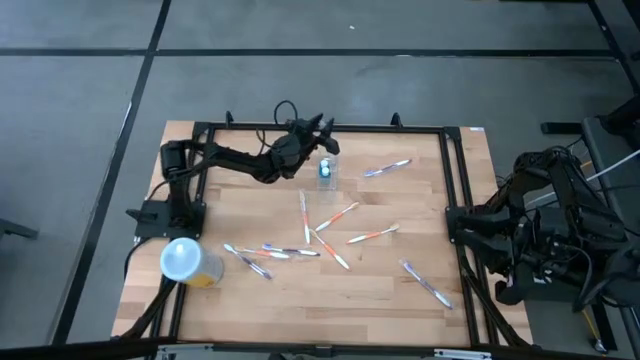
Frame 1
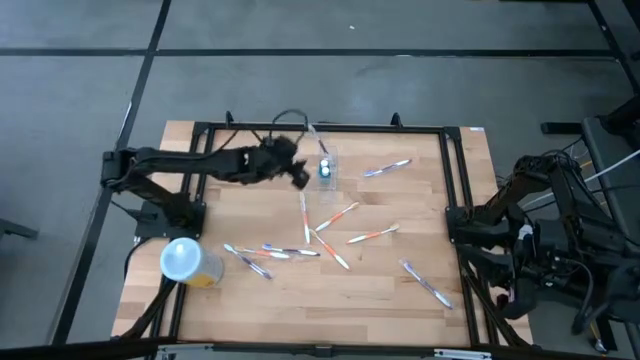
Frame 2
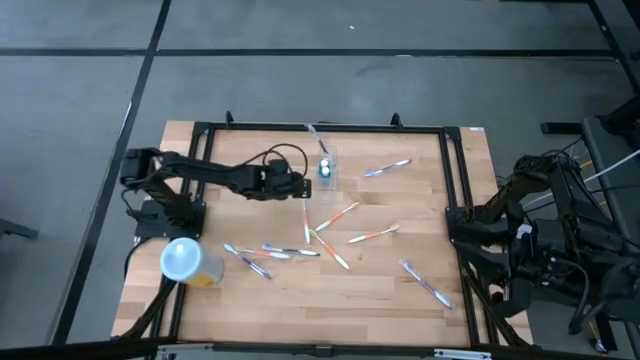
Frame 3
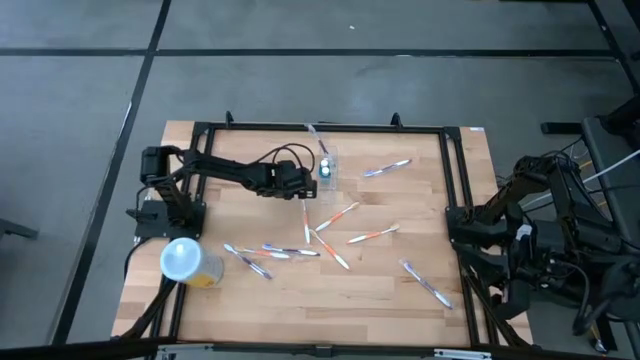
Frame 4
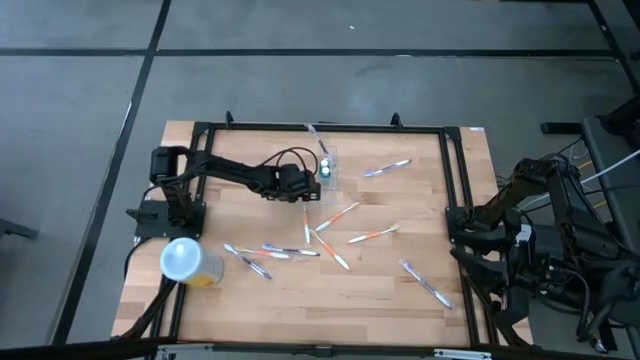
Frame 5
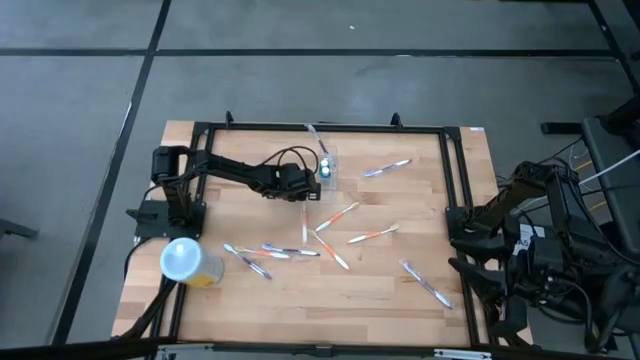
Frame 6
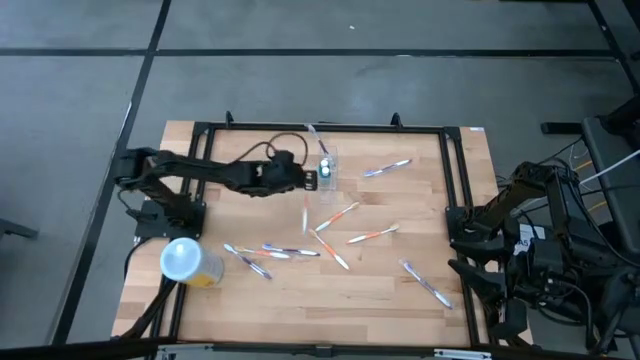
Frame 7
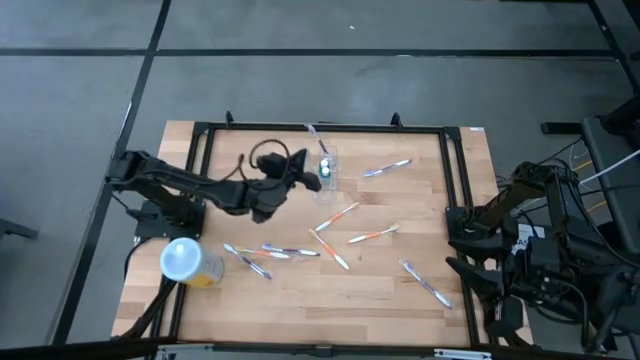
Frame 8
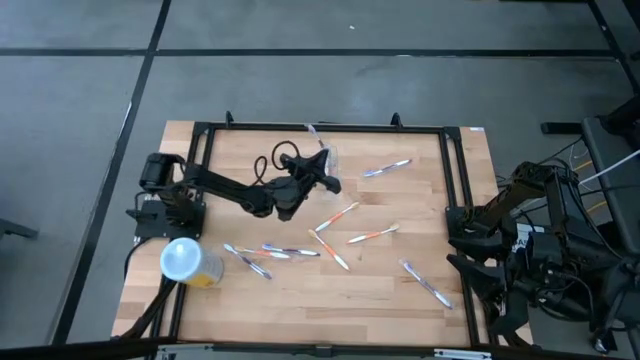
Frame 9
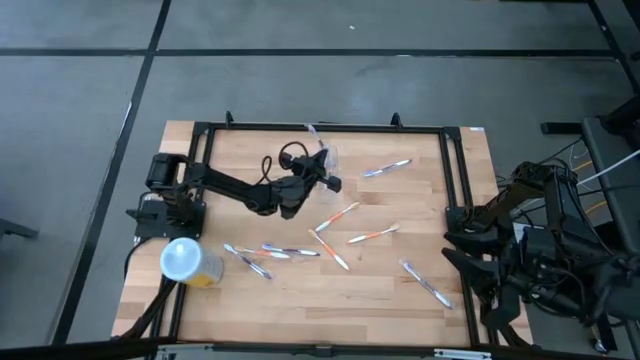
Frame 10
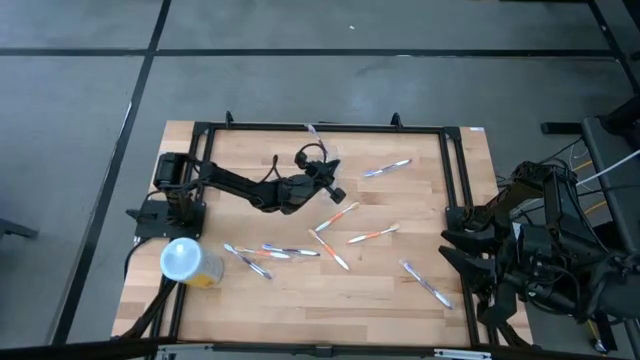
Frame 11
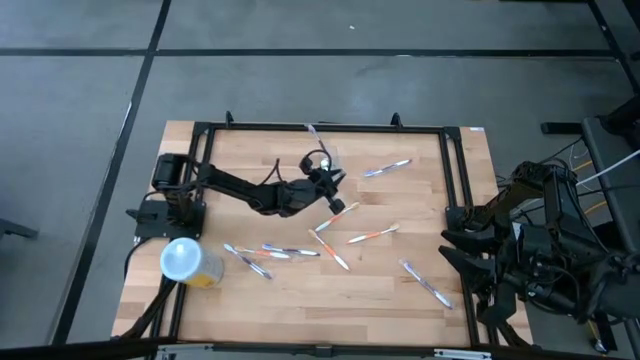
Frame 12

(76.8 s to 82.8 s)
Task: Pick & Place toothbrushing station
Put the orange toothbrush into the transparent organizer

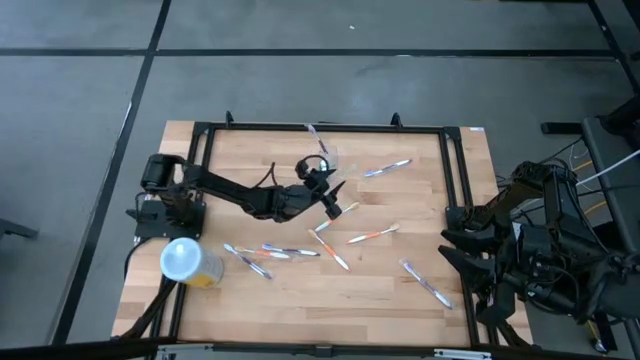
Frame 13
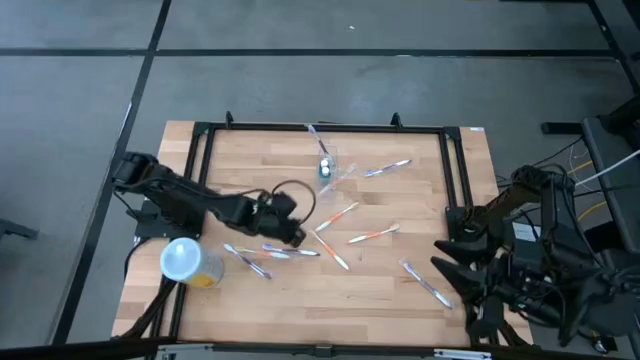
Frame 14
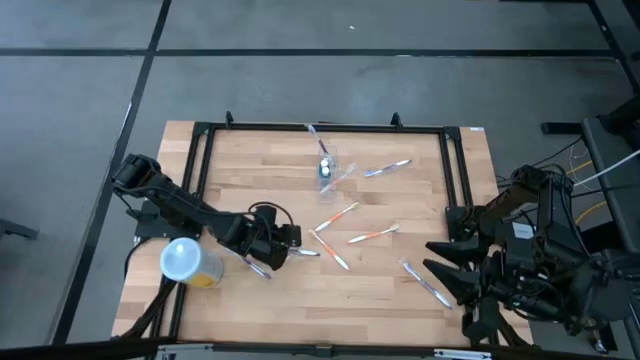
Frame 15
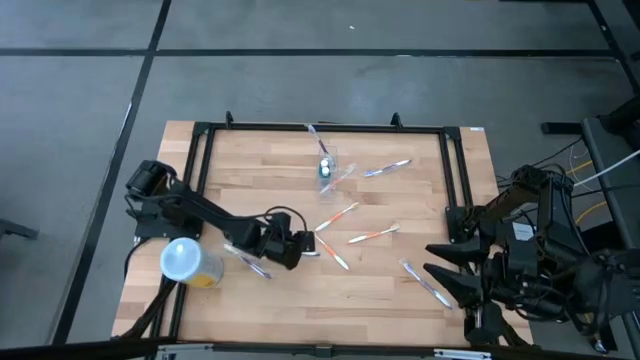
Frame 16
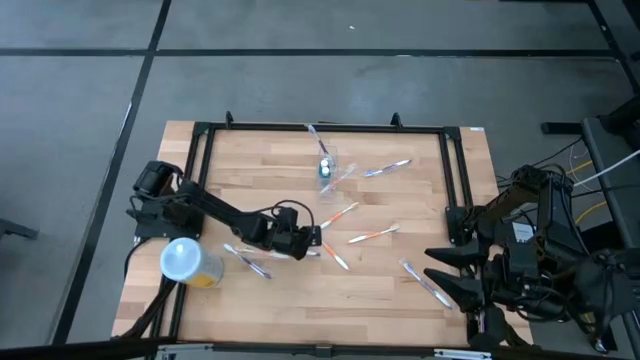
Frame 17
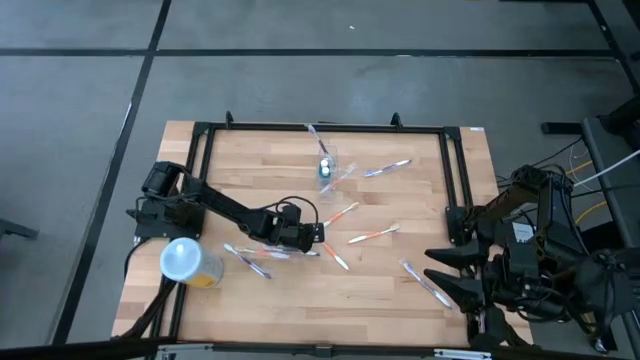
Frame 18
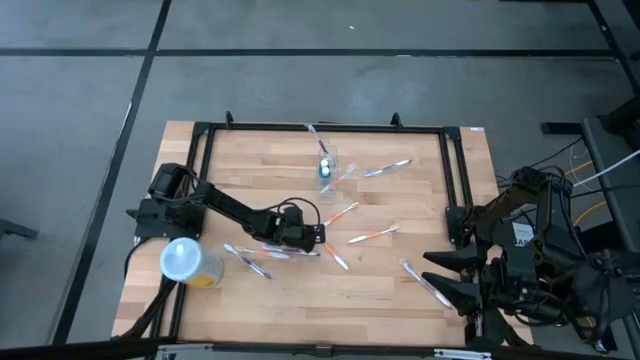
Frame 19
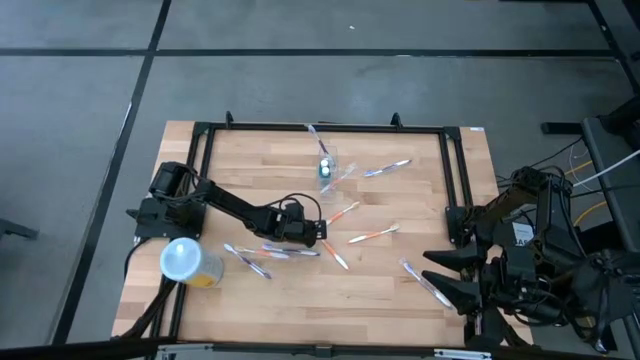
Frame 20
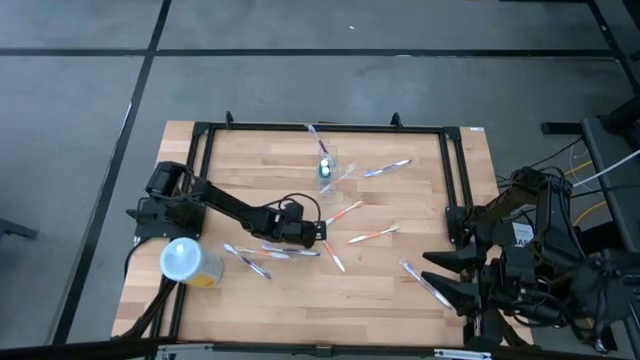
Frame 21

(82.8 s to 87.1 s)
Put the orange toothbrush into the transparent organizer

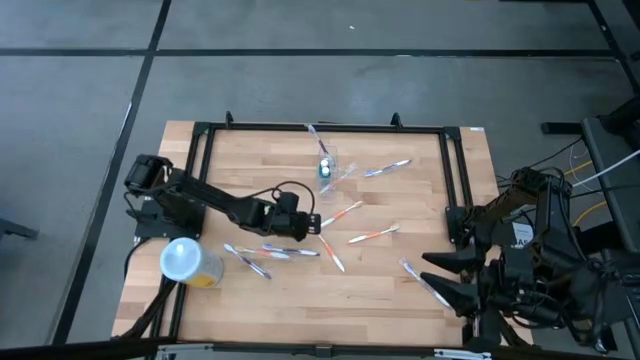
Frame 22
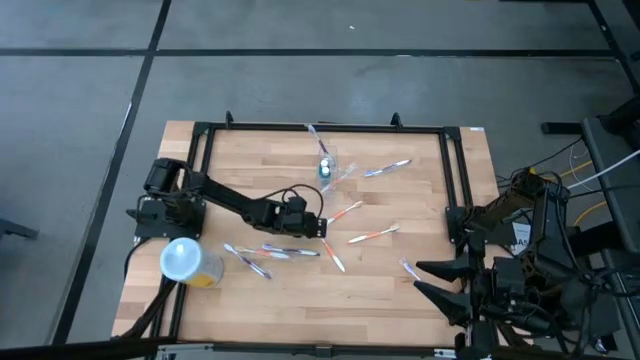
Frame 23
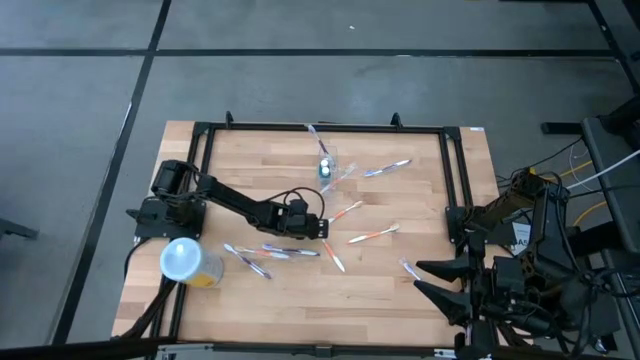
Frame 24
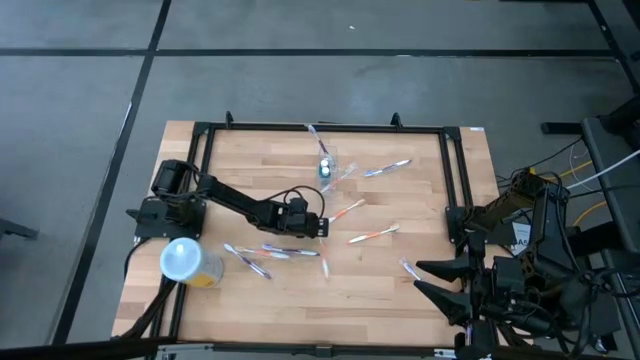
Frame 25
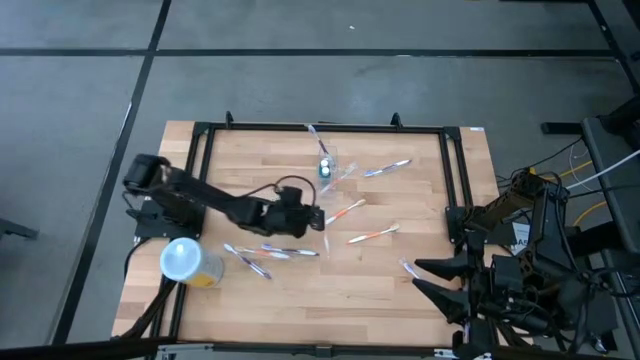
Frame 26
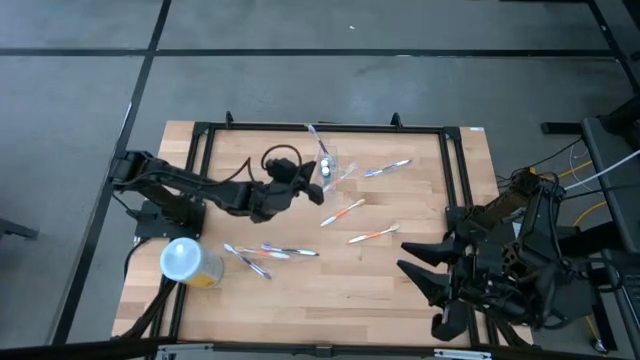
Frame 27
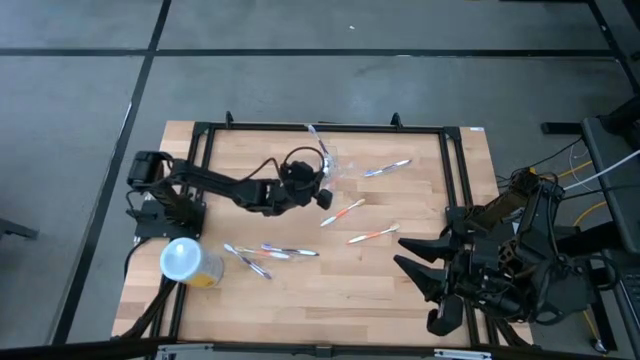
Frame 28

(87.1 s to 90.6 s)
Put the orange toothbrush into the transparent organizer

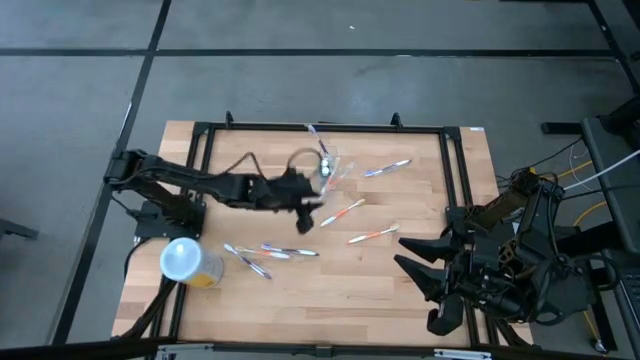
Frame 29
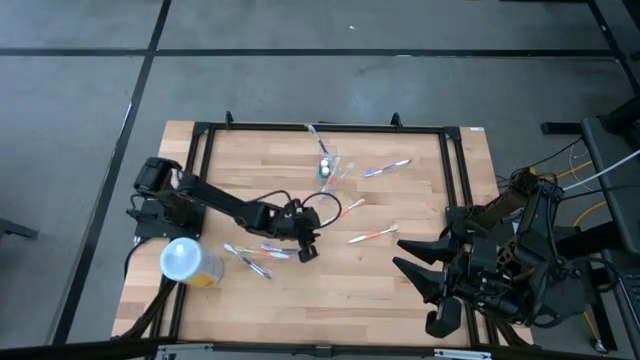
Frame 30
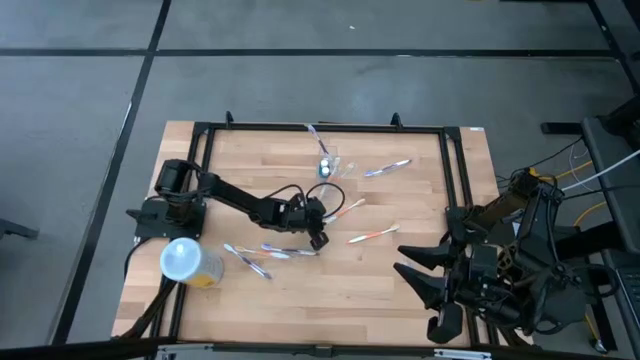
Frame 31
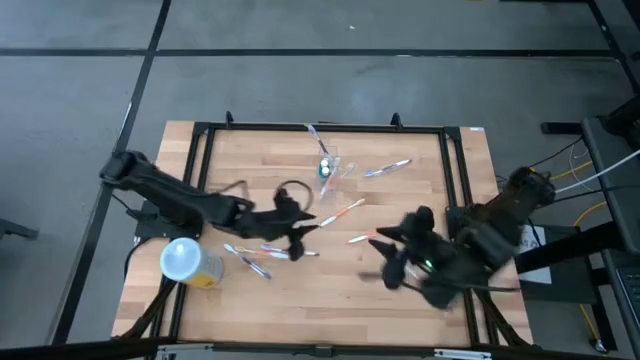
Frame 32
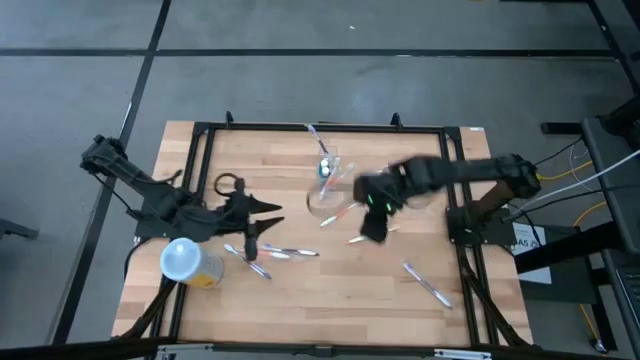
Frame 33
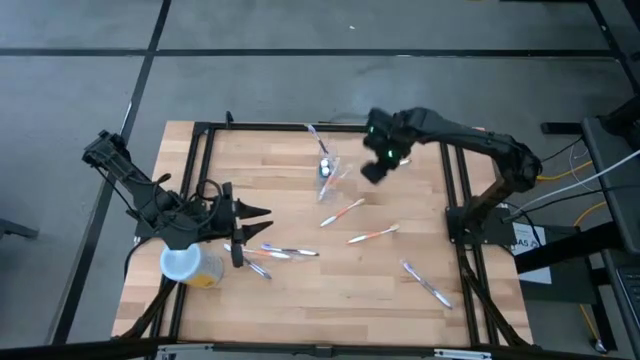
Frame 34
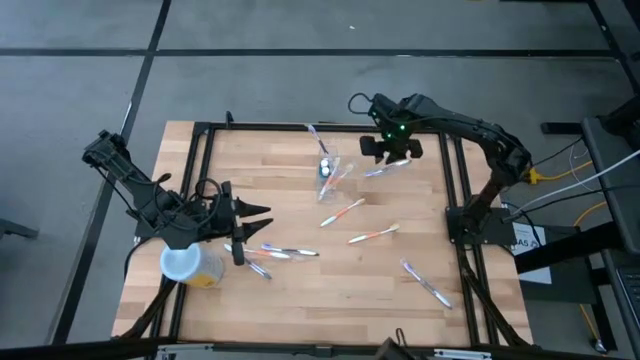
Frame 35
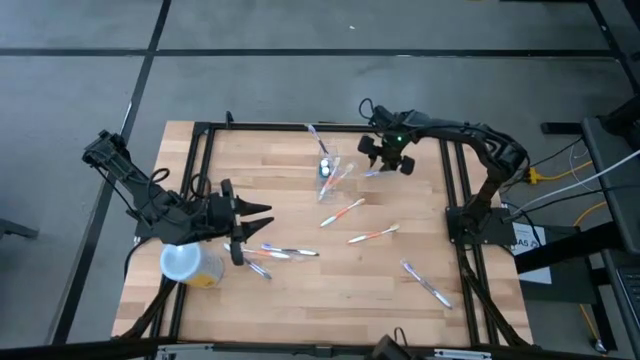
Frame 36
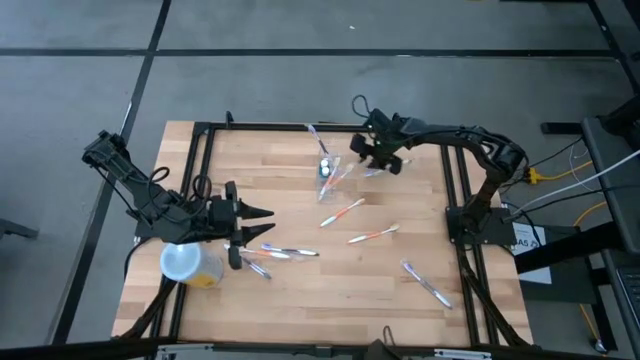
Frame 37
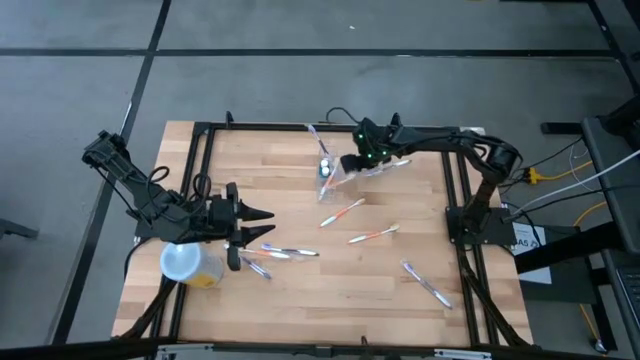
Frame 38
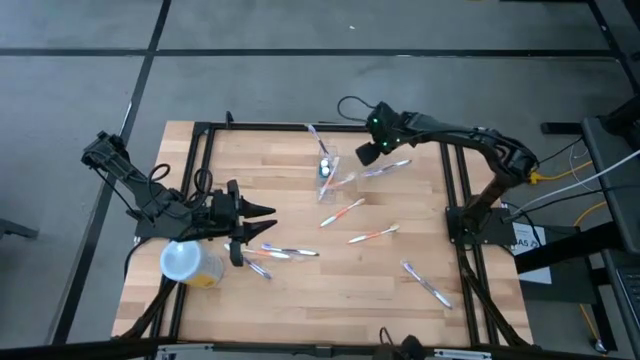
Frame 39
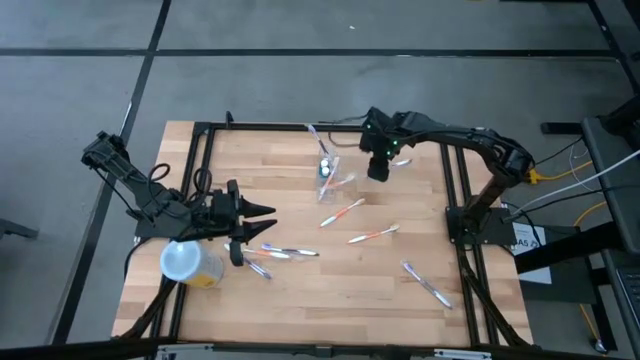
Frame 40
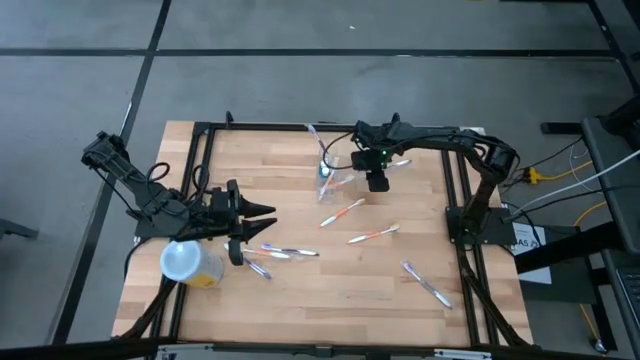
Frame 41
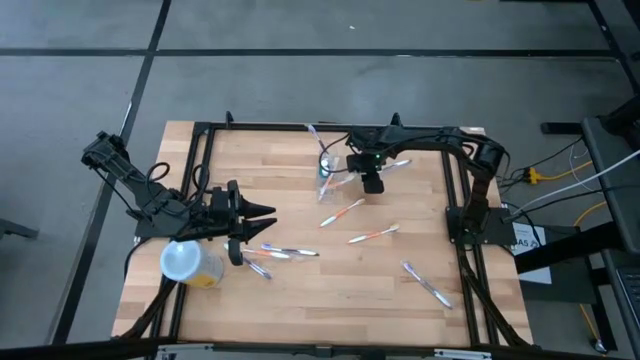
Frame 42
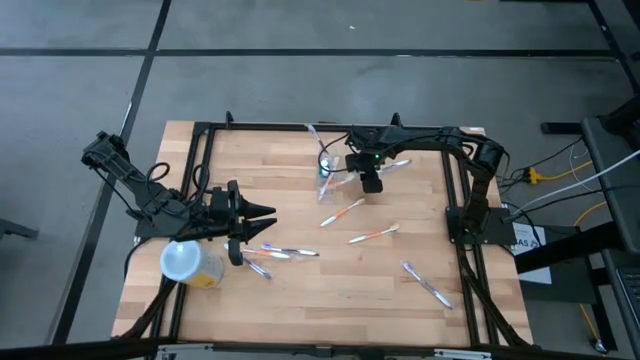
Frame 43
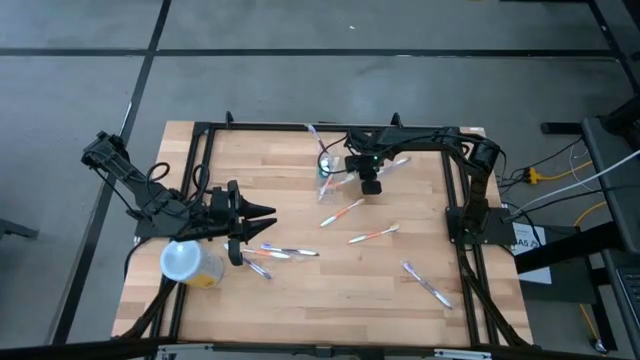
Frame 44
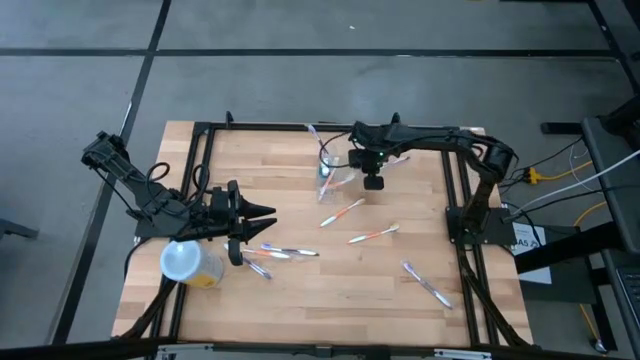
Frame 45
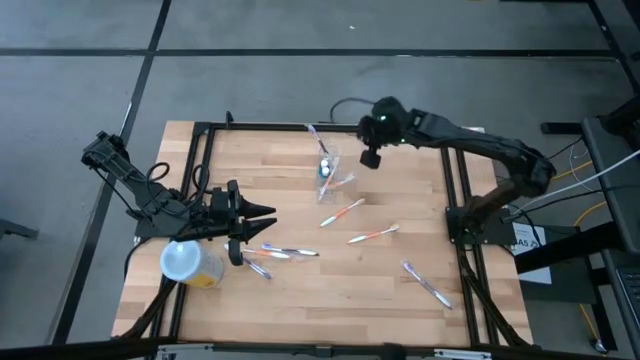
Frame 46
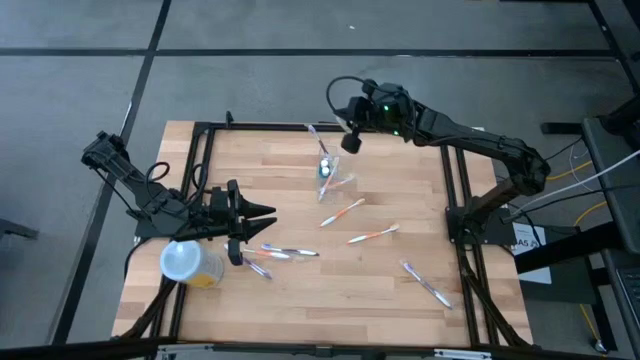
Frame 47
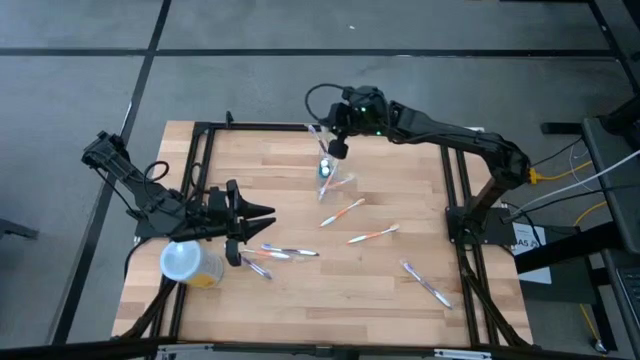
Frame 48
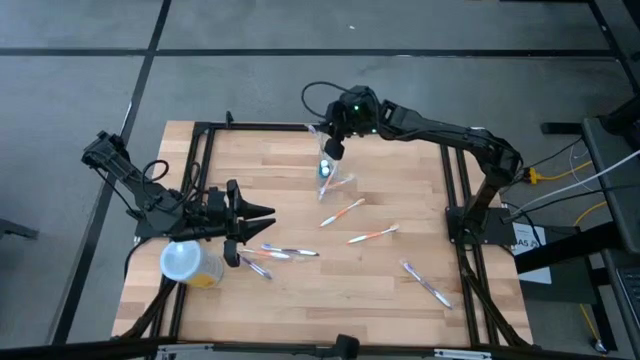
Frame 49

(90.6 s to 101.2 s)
Put the purple toothbrush into the transparent organizer
